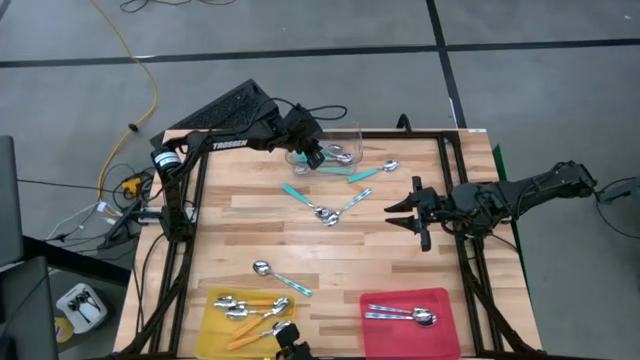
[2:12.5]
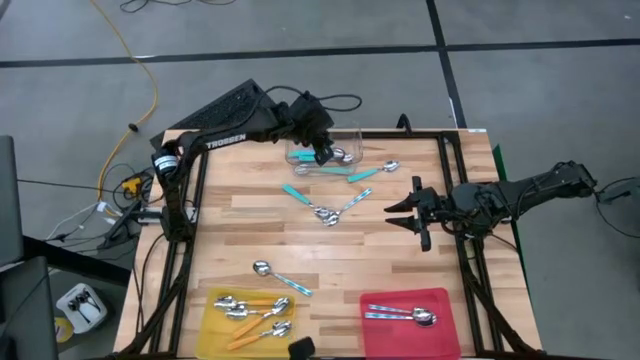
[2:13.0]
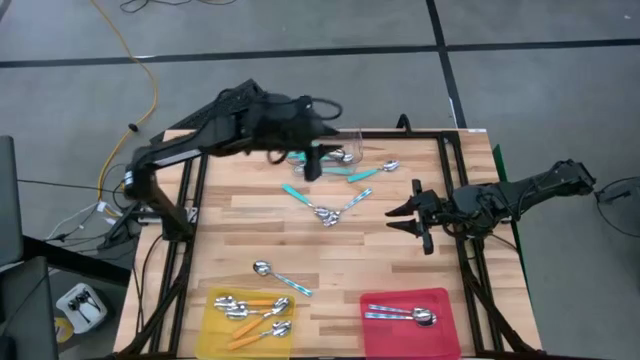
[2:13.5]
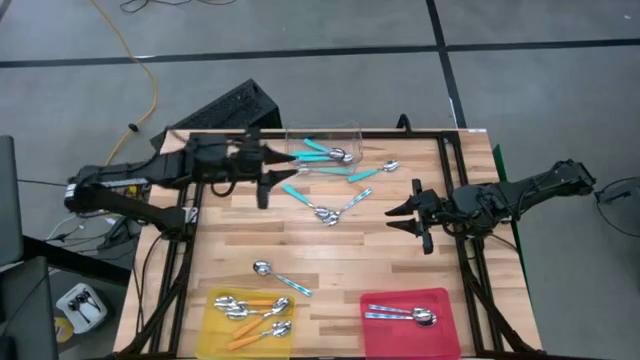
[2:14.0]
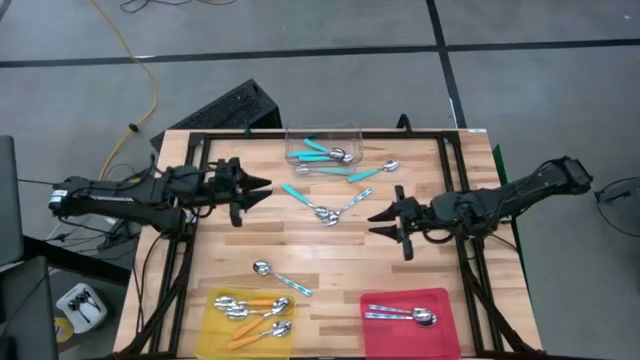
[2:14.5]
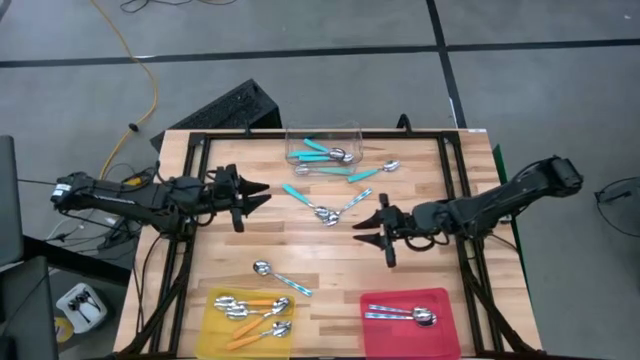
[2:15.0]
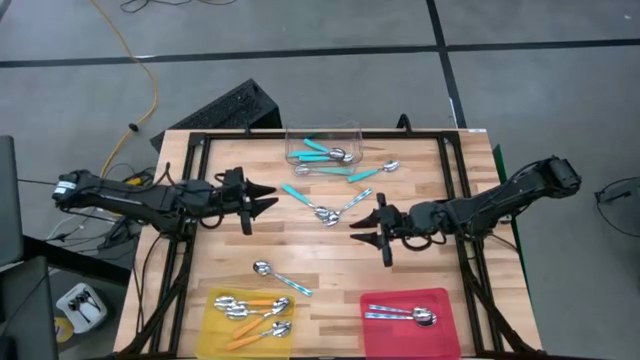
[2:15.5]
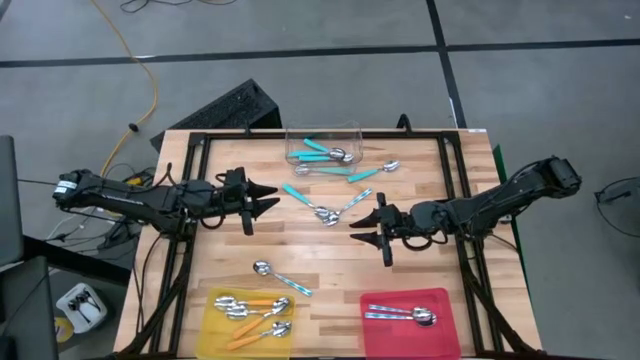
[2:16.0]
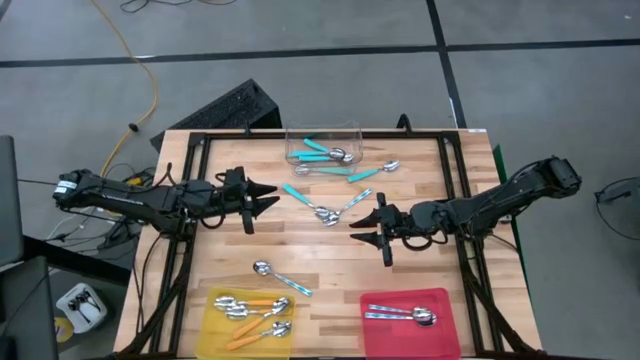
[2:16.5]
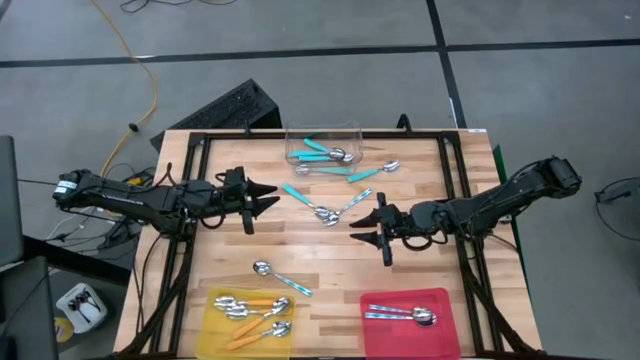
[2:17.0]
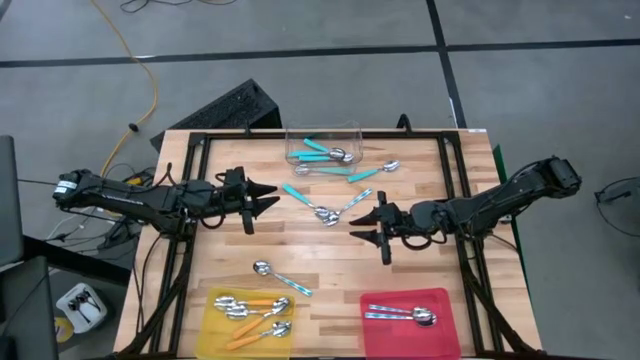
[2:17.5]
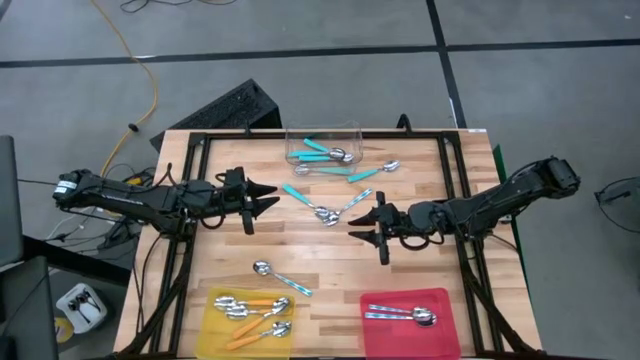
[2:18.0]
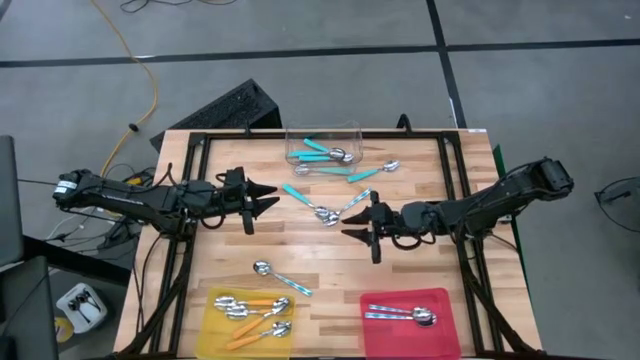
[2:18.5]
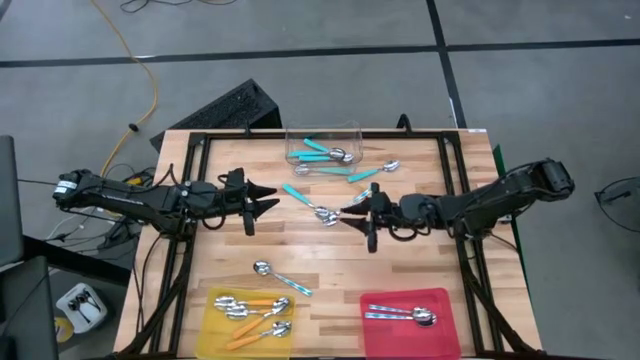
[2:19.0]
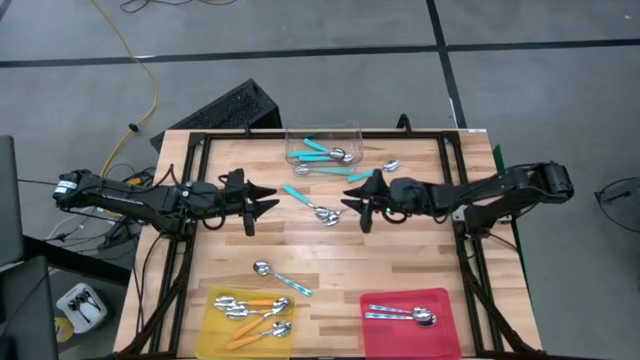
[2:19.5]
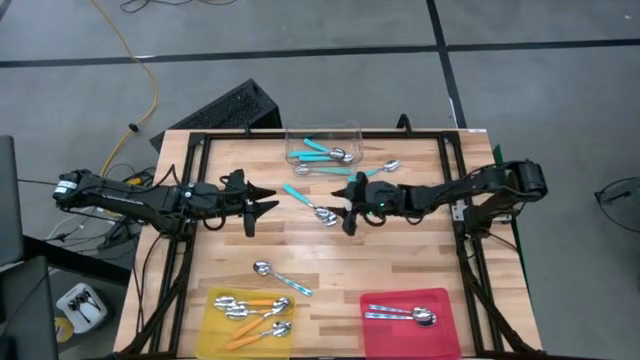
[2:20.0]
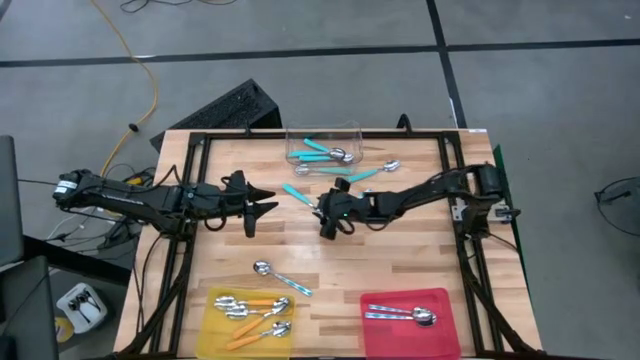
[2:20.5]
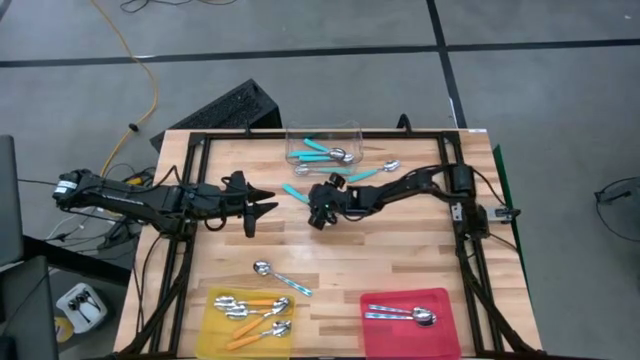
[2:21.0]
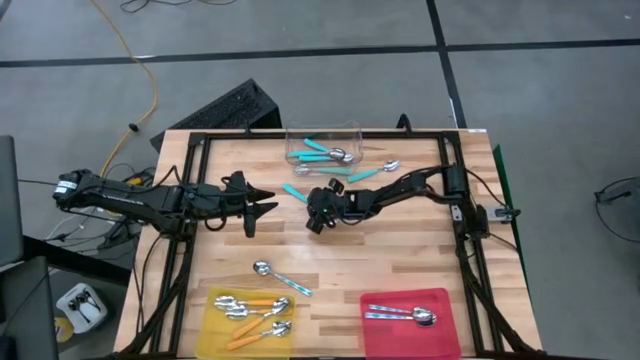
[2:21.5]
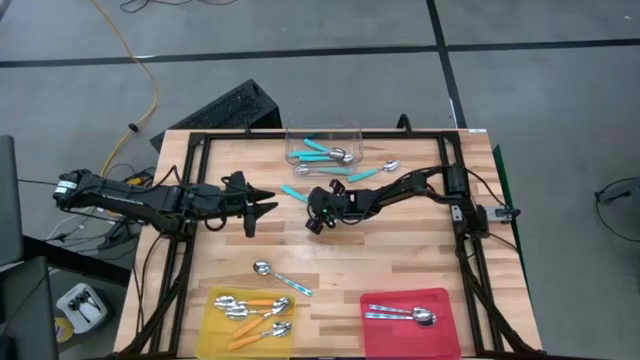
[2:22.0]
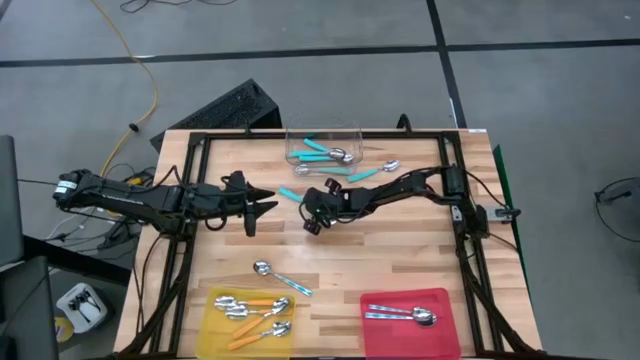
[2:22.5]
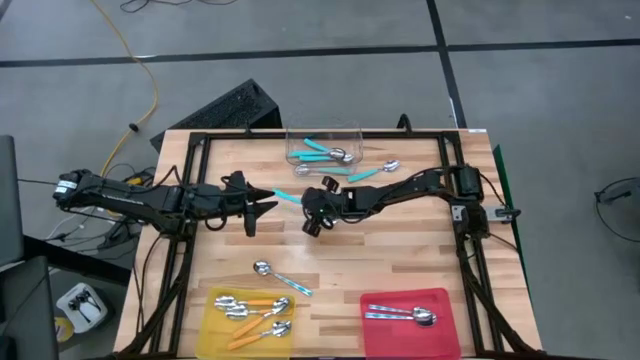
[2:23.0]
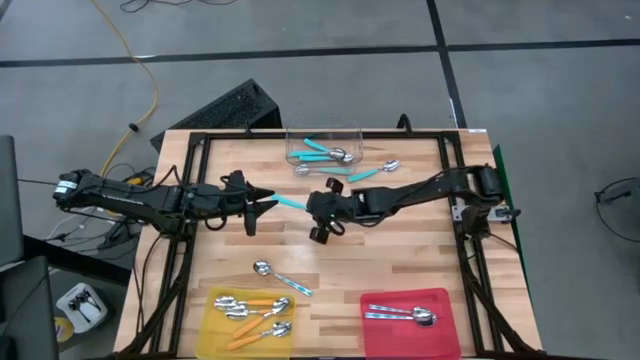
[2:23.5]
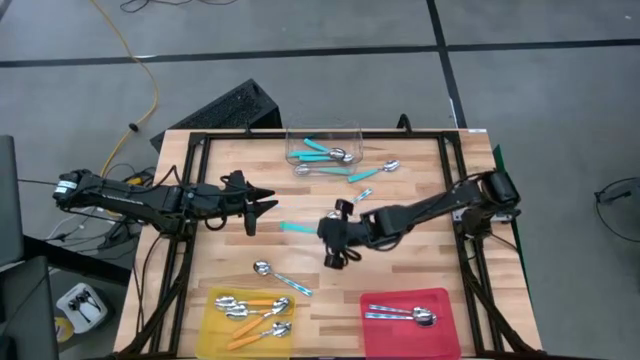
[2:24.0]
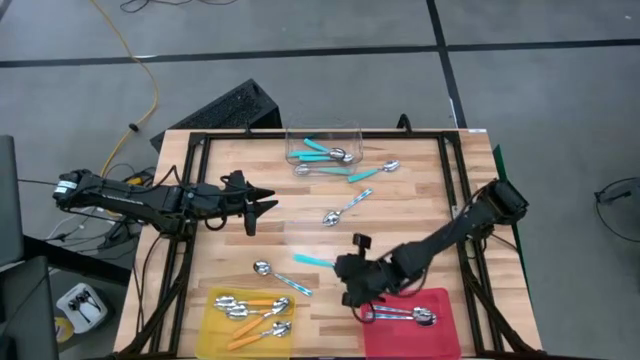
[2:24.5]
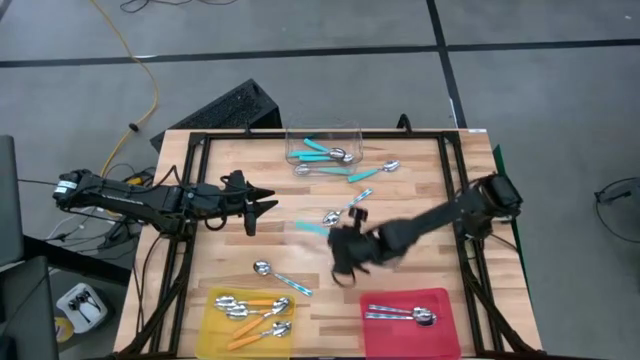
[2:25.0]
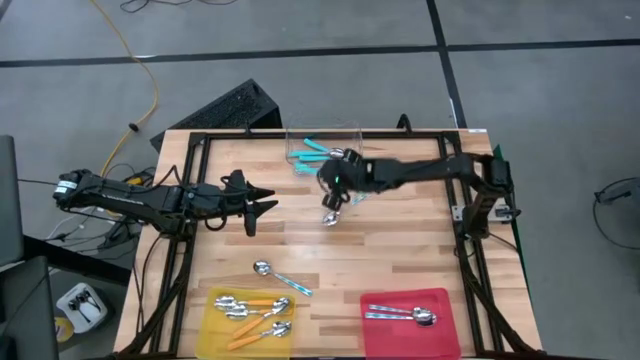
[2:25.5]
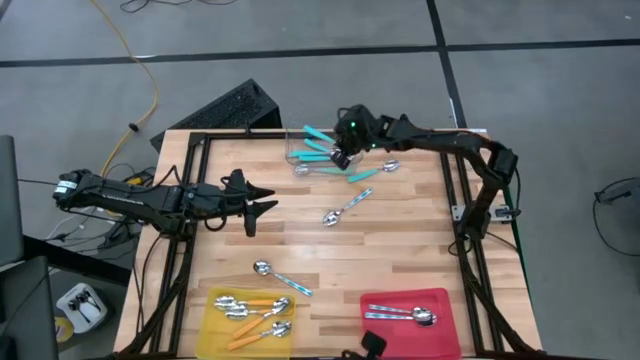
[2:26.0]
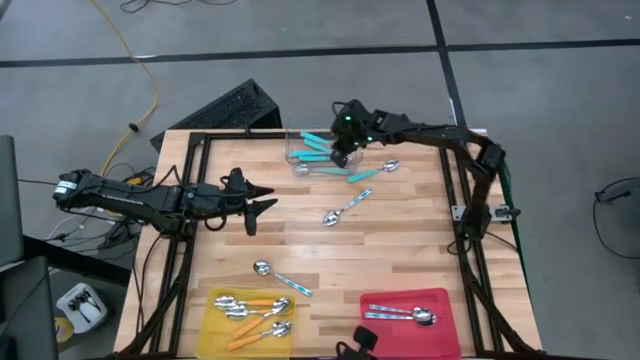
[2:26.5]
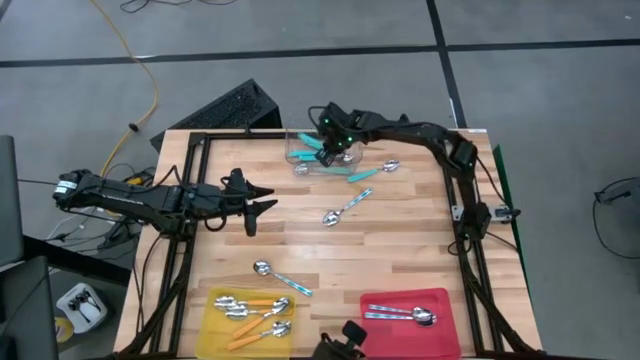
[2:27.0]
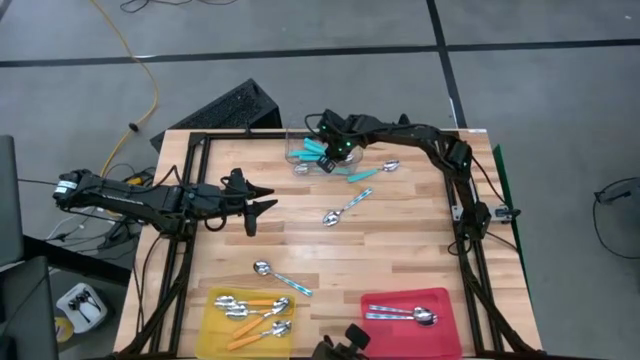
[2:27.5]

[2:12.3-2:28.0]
Task: Sort silverware by color (type)
Put the blue spoon into the transparent bin
